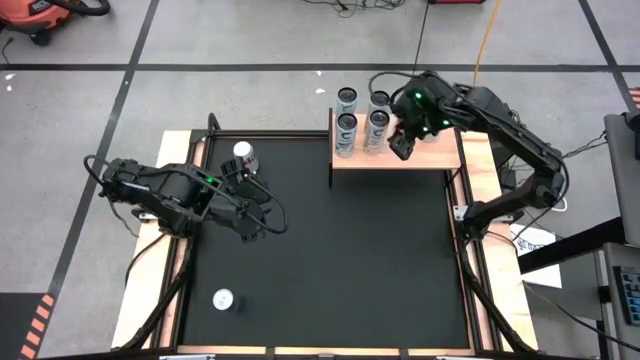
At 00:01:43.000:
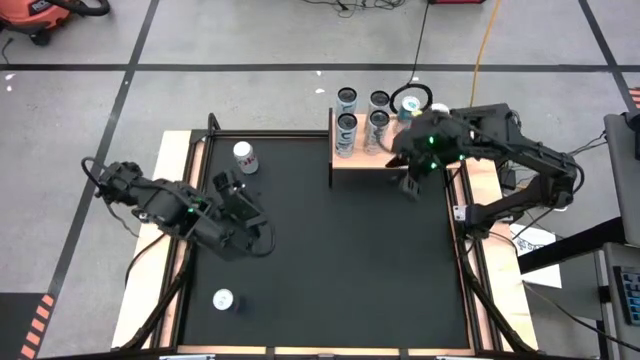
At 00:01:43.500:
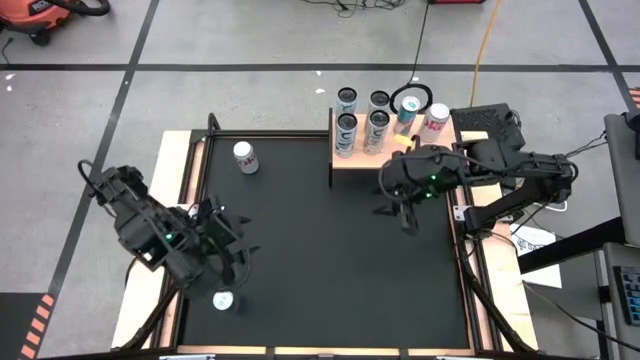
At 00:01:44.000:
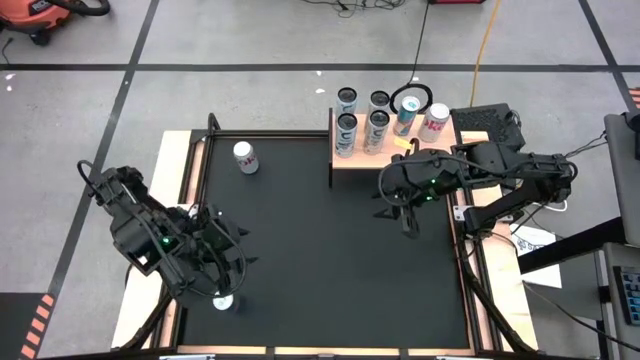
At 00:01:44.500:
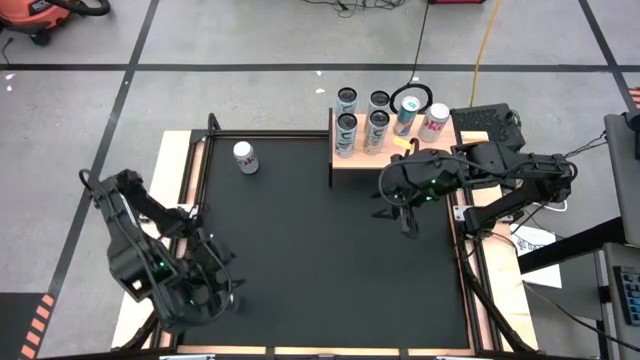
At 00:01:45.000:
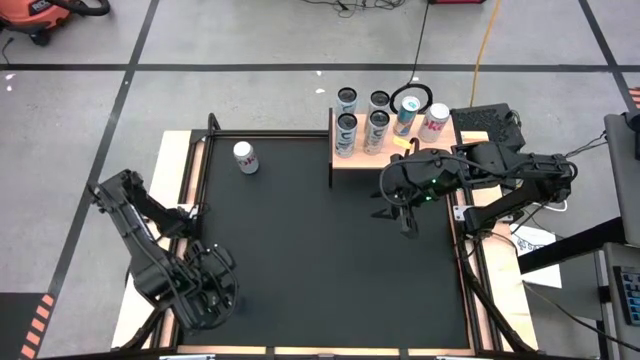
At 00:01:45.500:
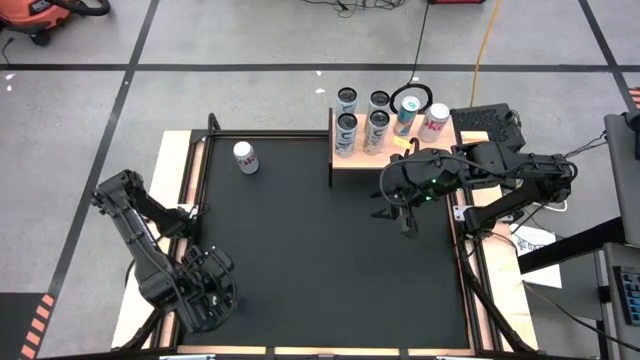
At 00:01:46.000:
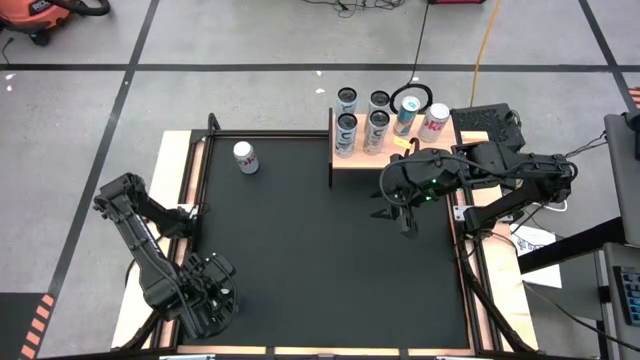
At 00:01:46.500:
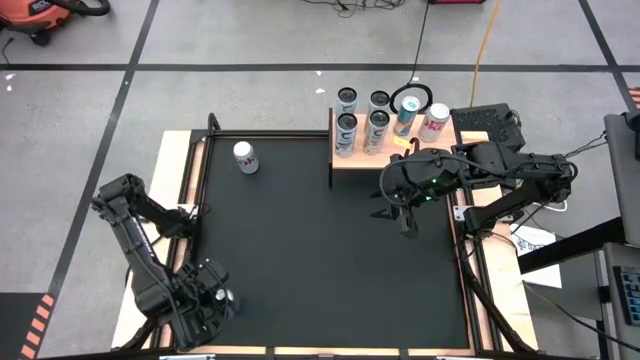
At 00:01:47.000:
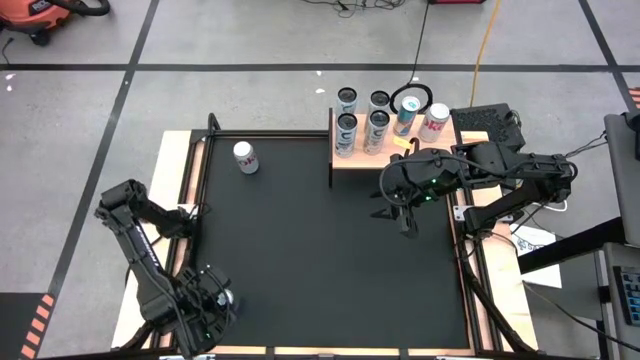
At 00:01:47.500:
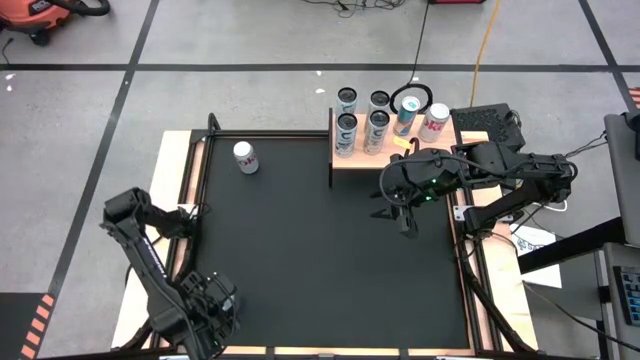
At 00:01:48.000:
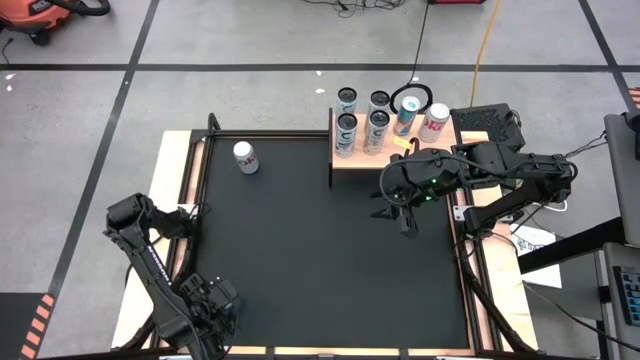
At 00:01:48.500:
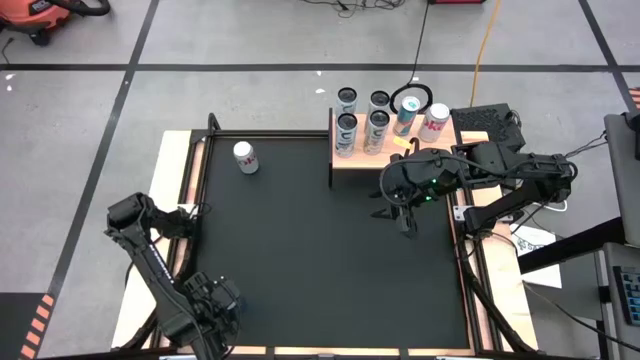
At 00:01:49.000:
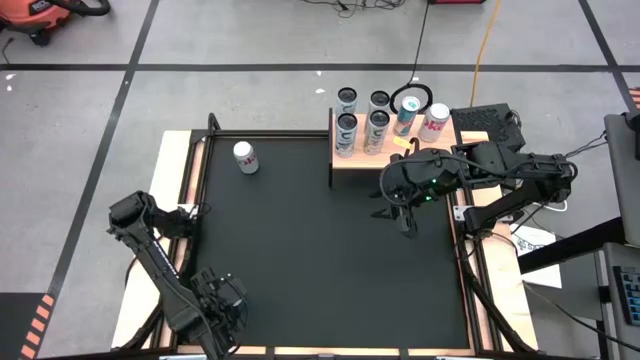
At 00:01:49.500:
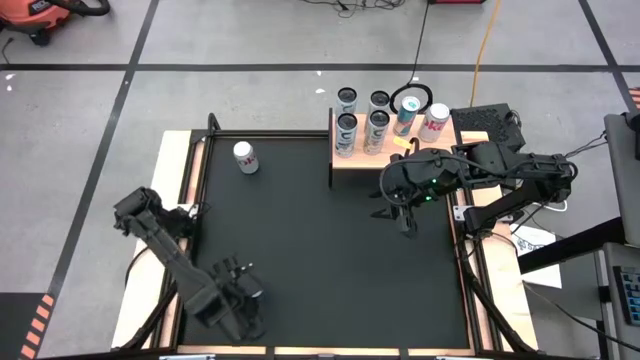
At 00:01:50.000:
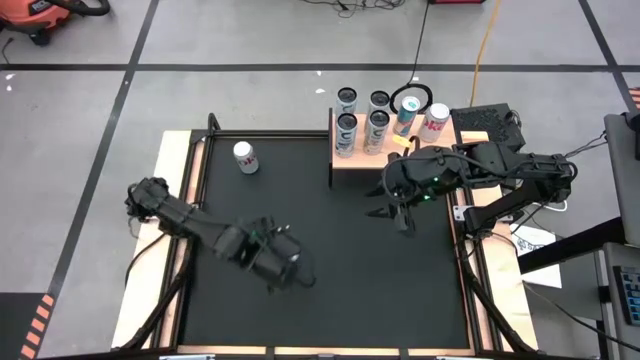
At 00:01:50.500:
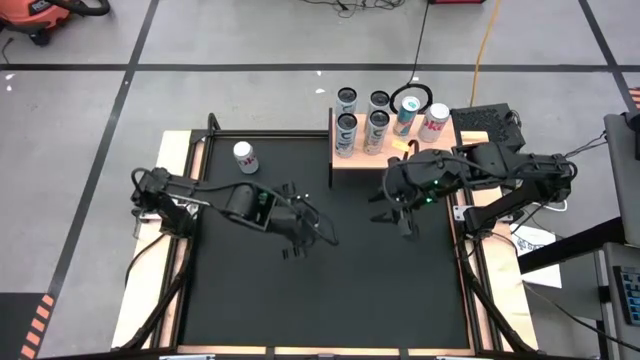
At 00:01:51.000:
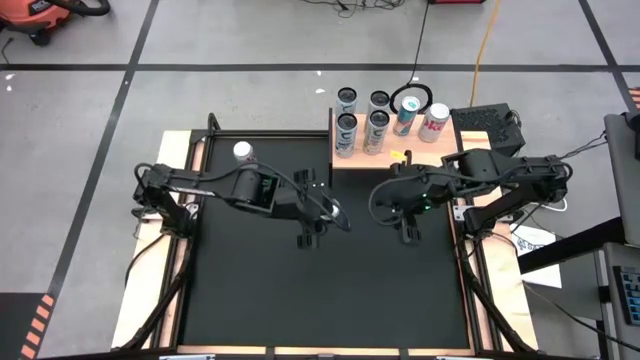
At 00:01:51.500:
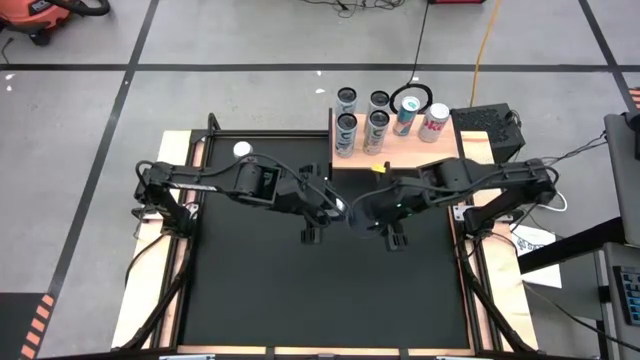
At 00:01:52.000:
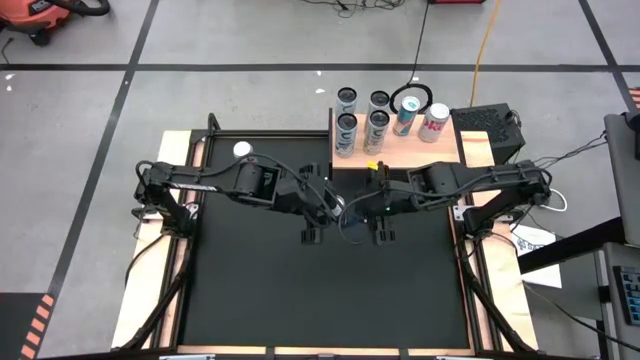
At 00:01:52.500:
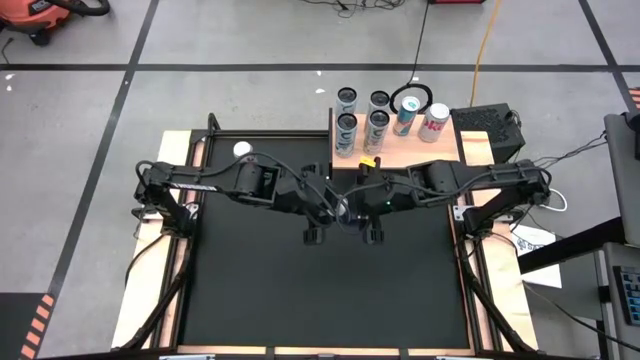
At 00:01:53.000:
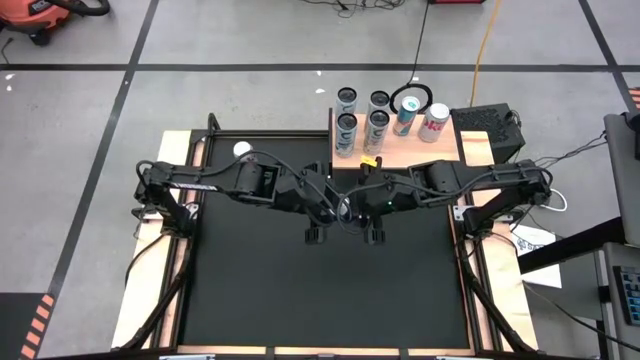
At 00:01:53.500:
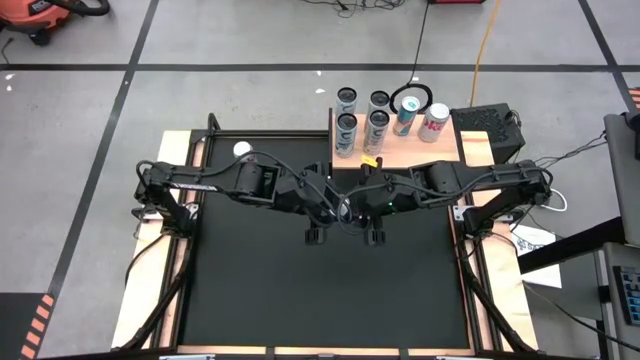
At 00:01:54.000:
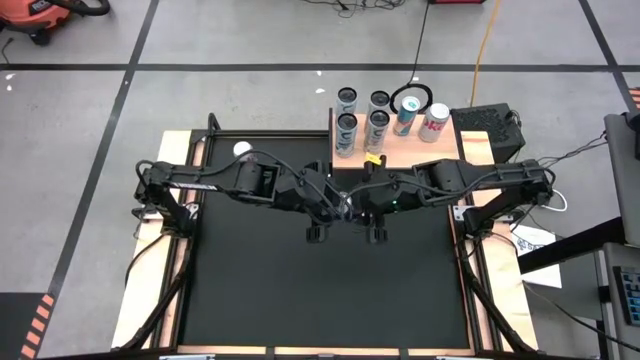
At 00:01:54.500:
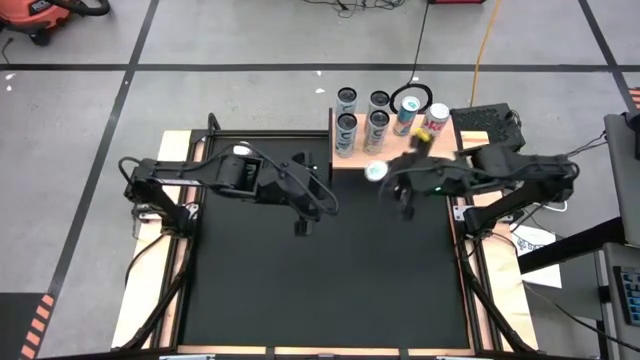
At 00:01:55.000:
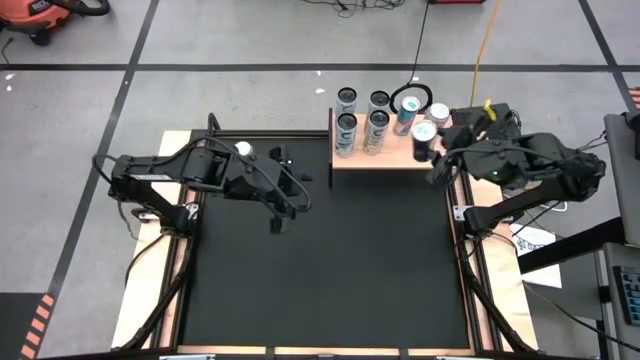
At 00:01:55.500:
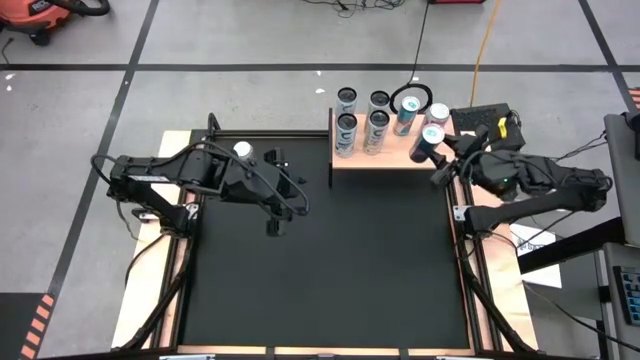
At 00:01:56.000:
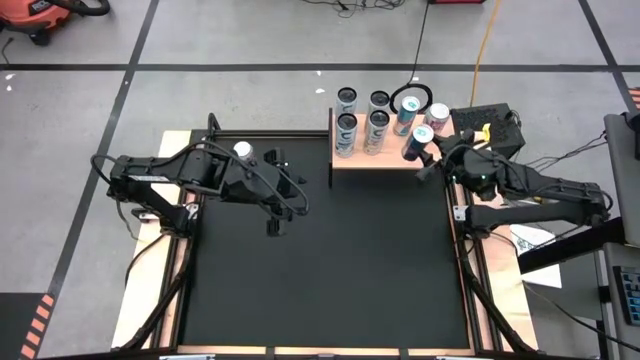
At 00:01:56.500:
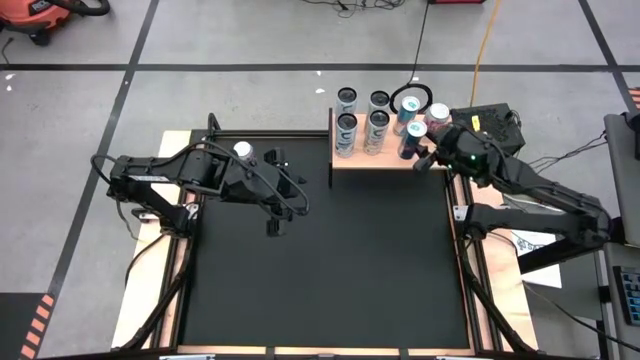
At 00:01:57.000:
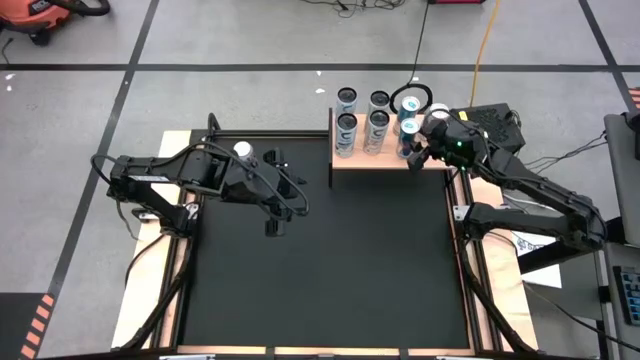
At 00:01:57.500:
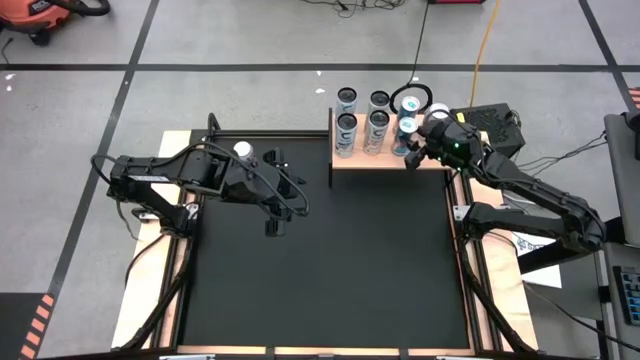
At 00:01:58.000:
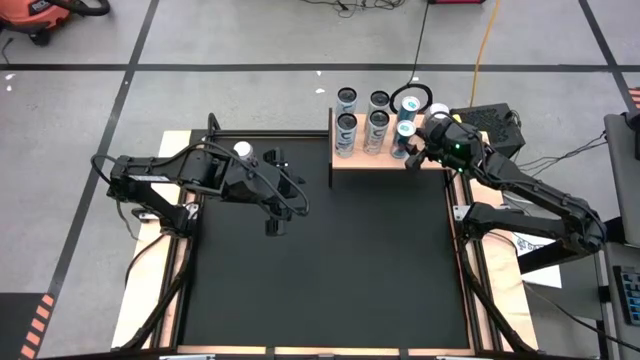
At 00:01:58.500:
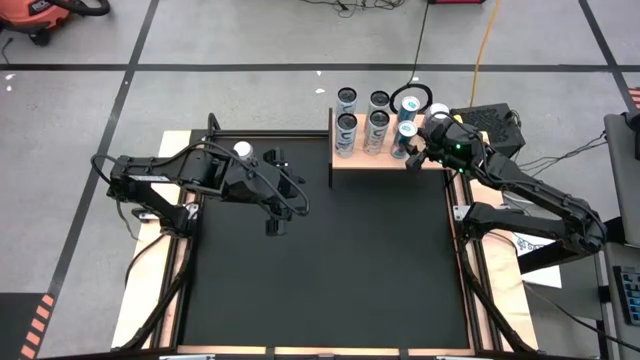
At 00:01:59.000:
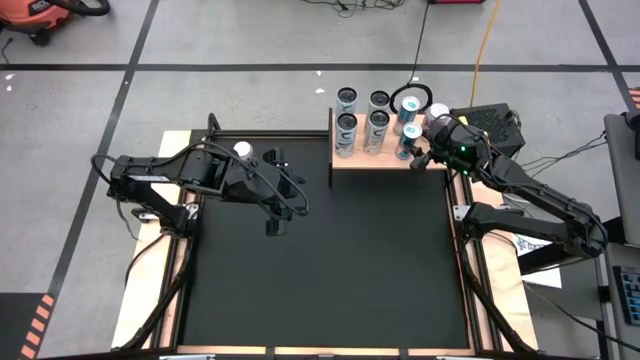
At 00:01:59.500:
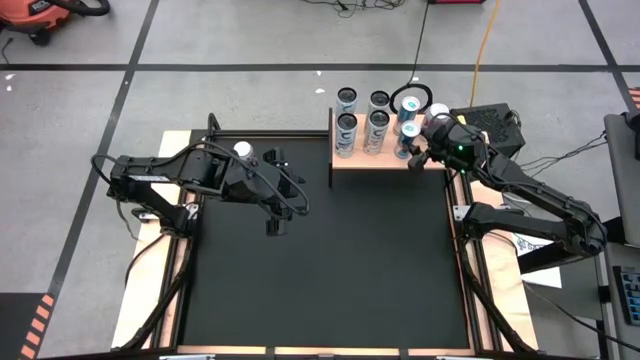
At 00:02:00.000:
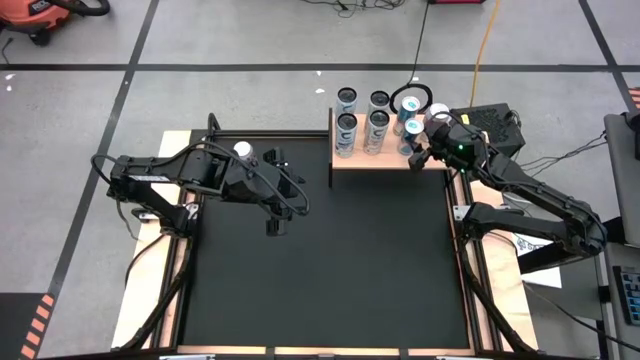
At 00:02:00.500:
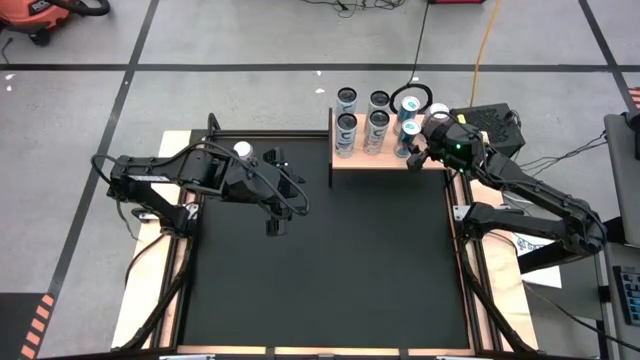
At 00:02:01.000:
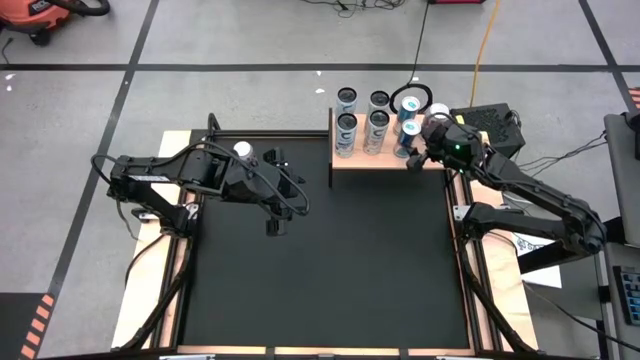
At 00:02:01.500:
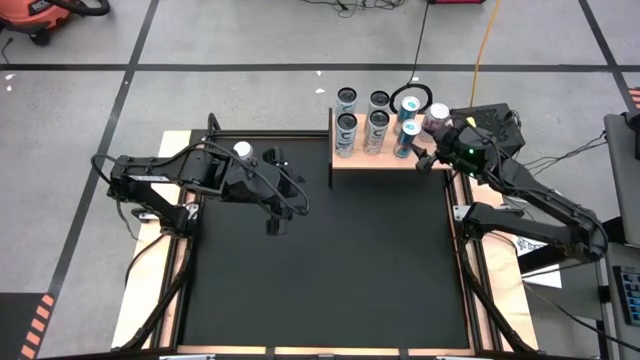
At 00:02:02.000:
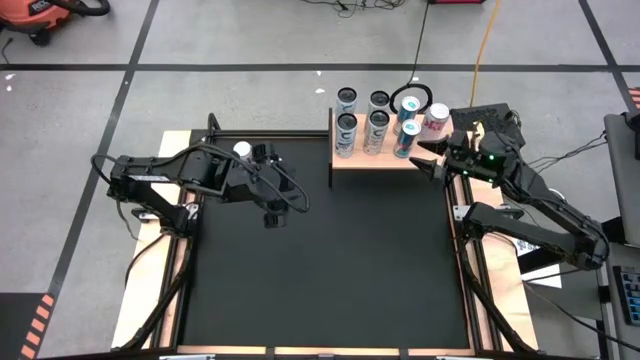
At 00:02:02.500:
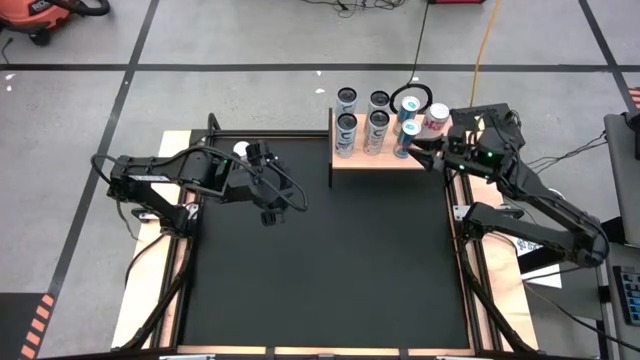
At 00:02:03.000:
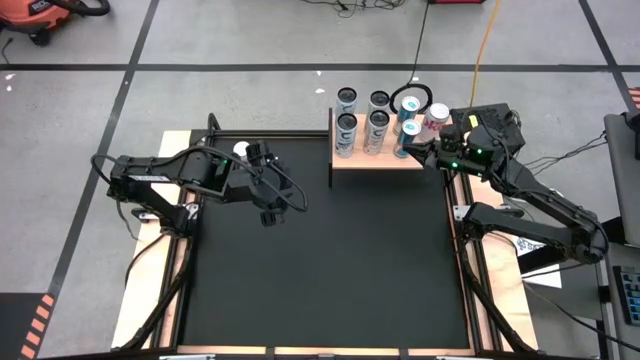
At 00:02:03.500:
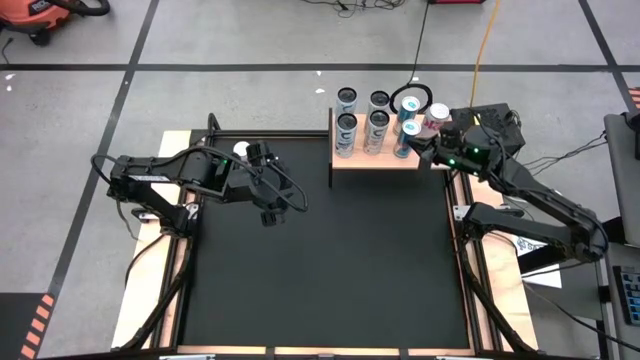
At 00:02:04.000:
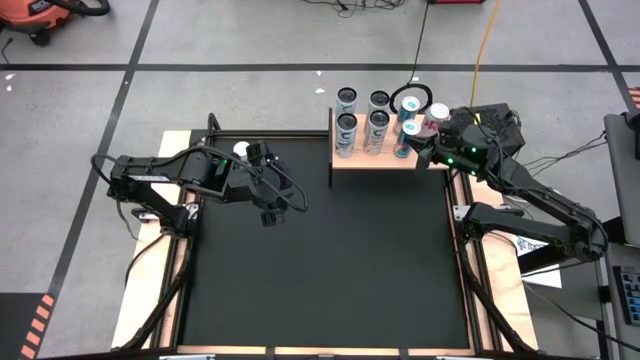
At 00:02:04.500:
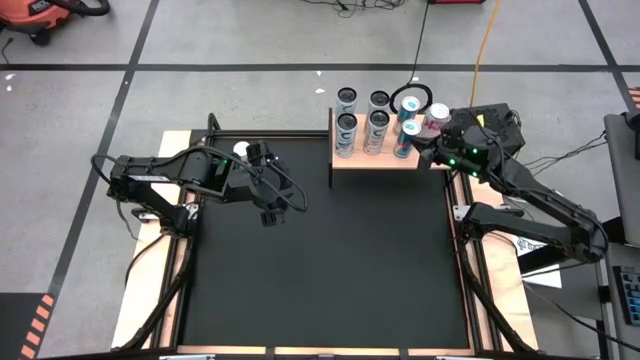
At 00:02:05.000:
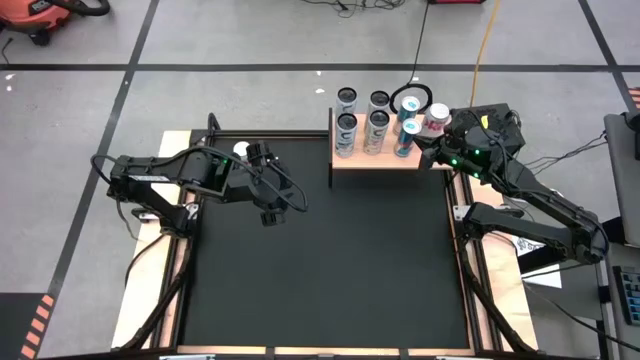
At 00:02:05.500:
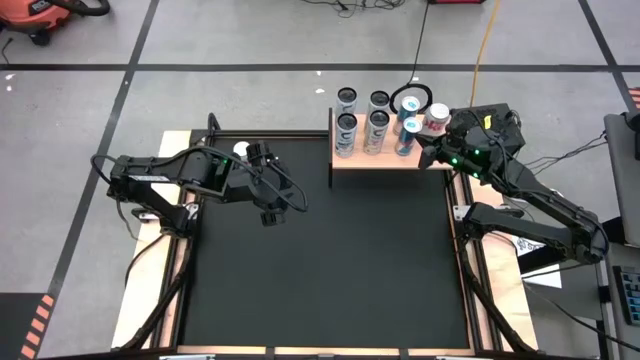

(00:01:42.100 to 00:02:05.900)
Task: Place canned beverage on shelf
Put the blue soda can on the shelf aligned with the other blue soda can
